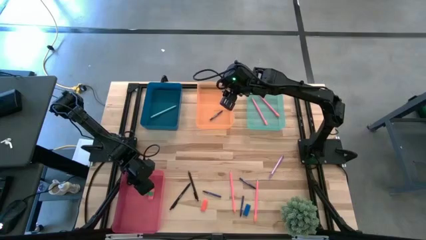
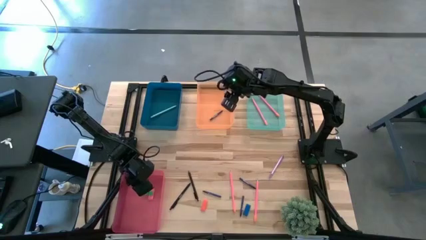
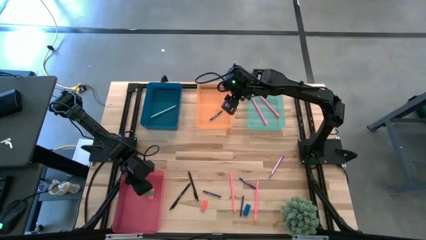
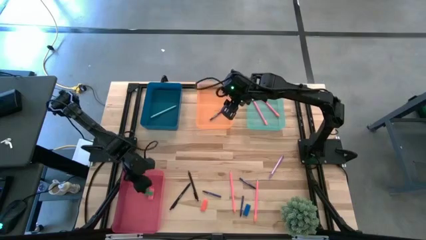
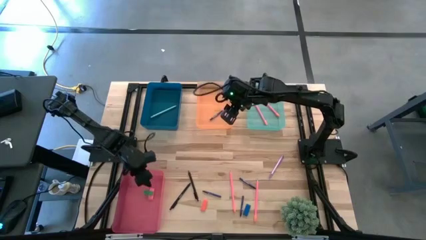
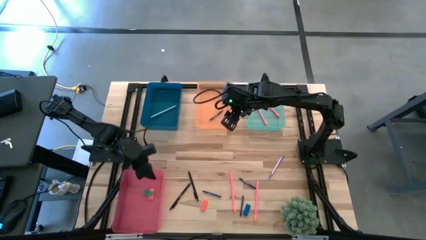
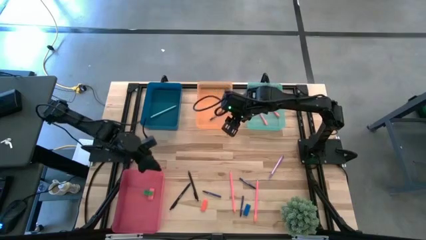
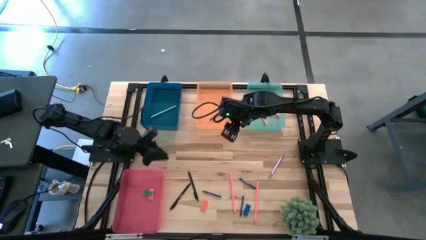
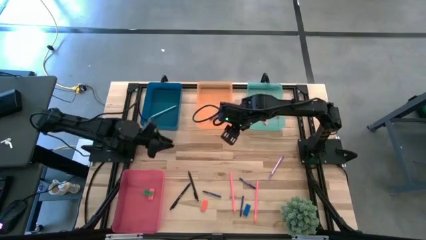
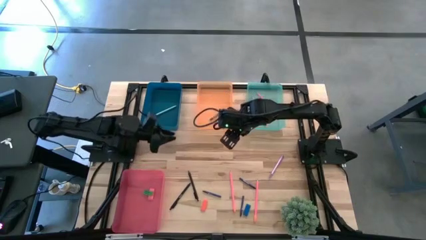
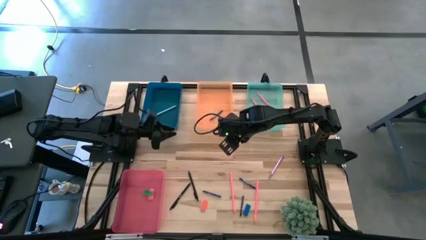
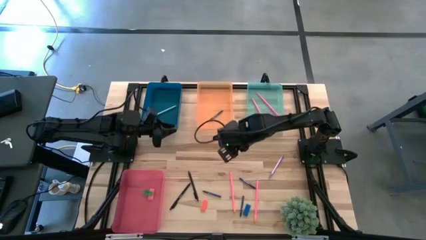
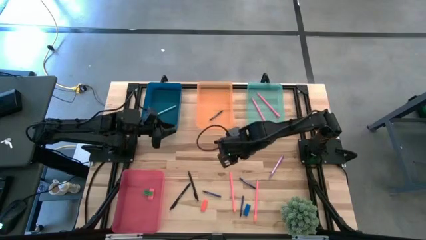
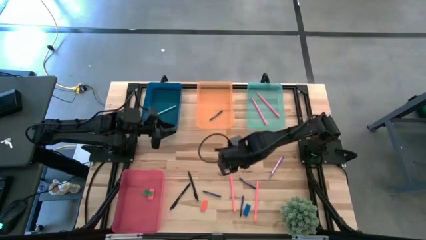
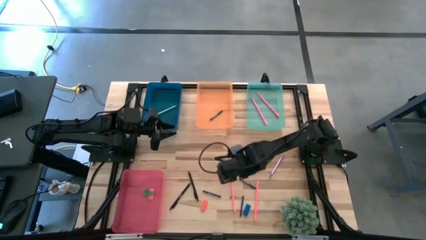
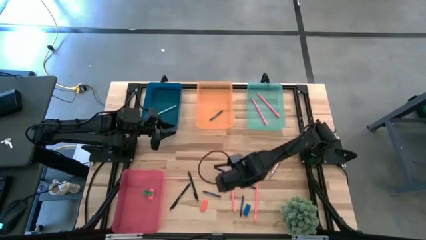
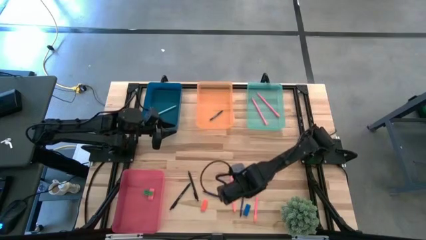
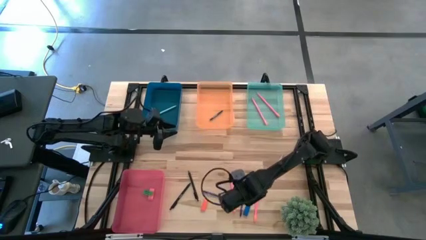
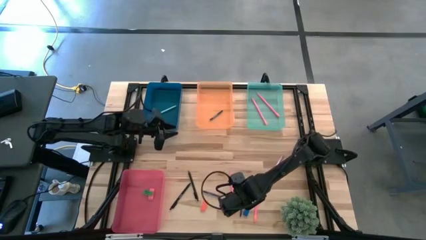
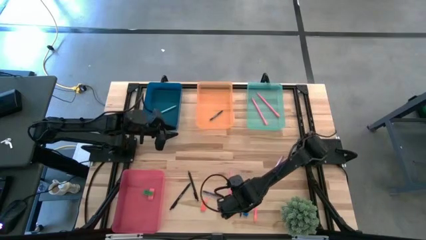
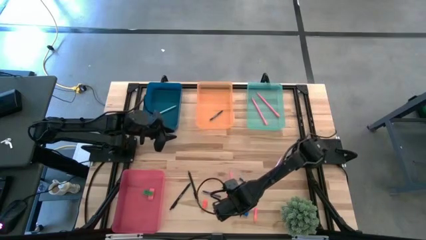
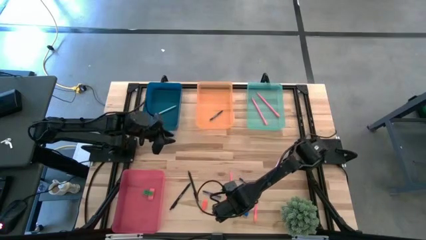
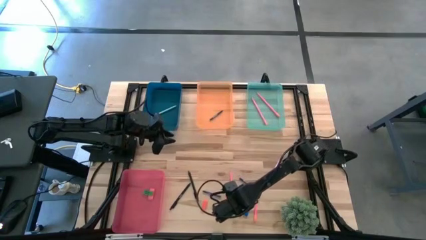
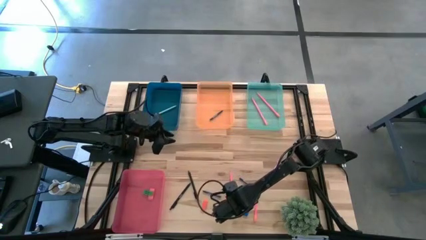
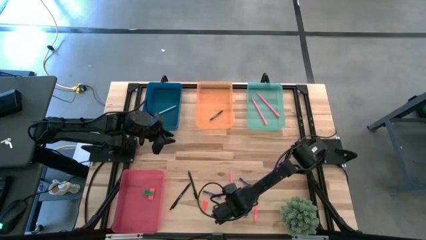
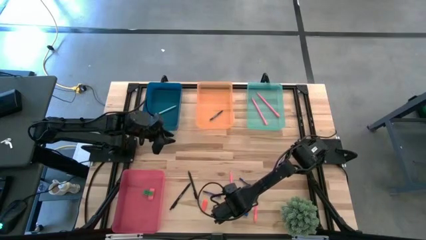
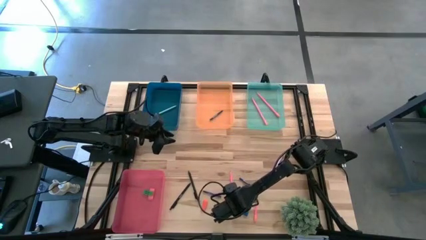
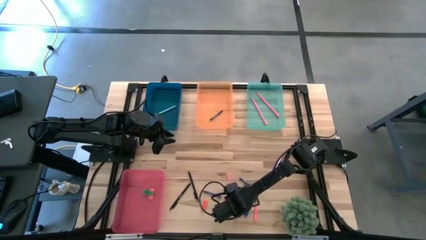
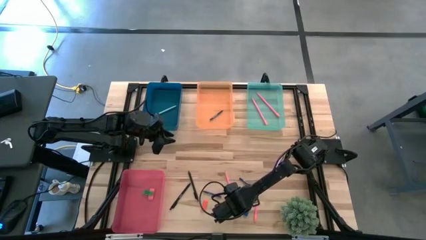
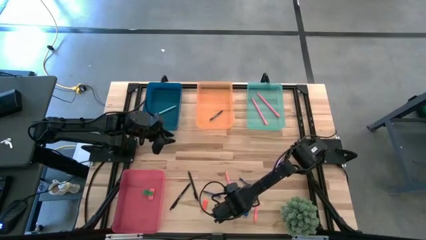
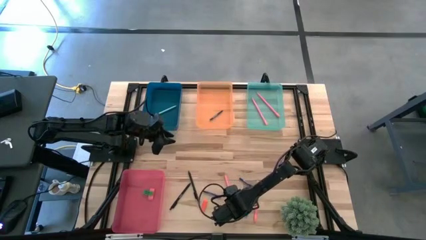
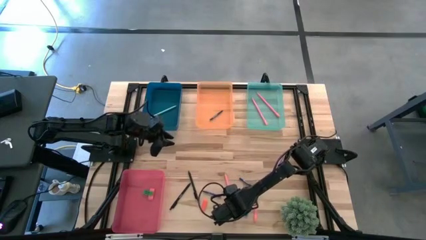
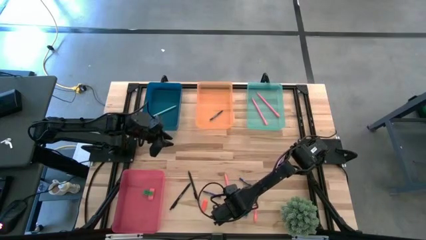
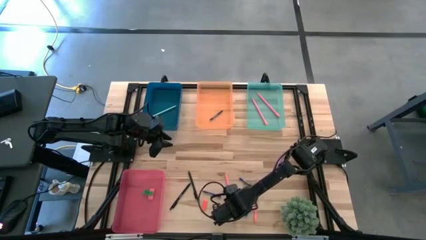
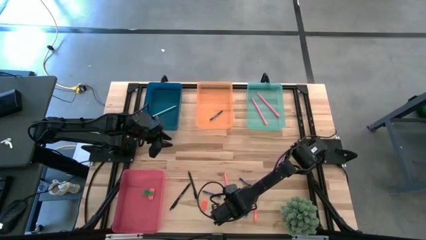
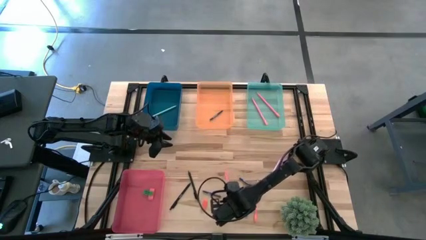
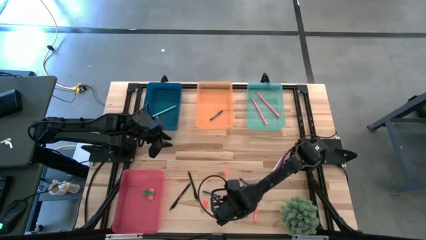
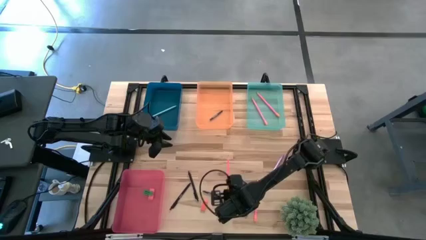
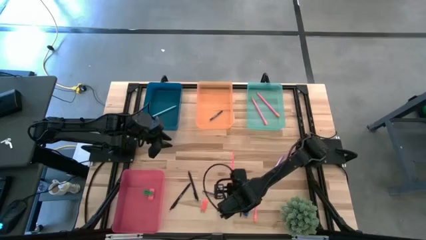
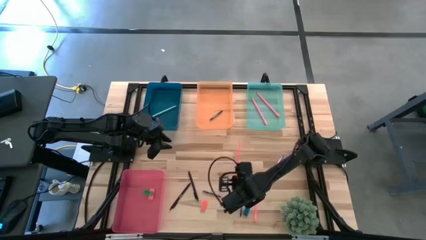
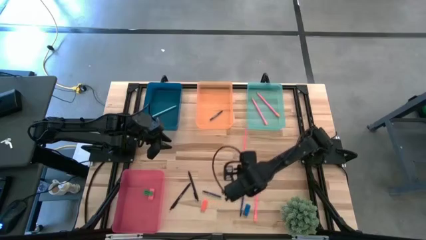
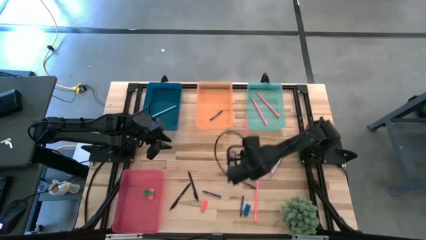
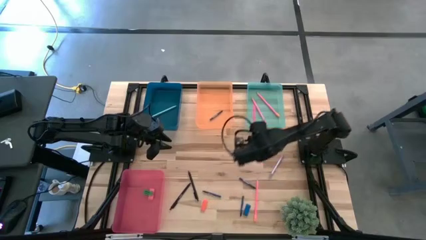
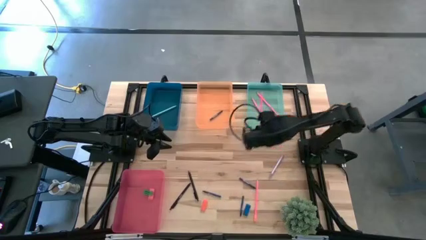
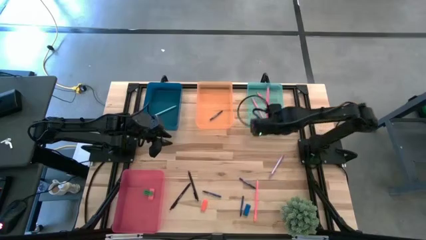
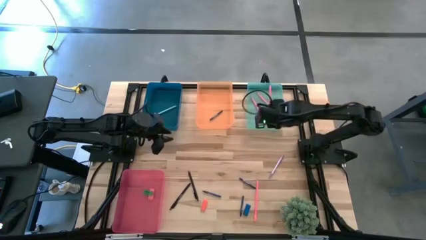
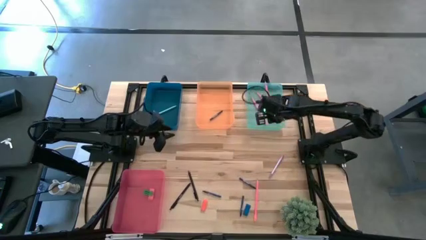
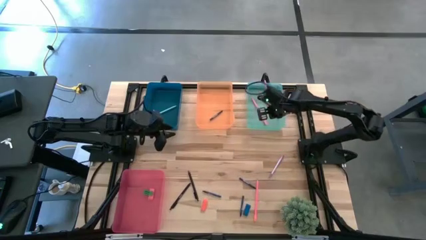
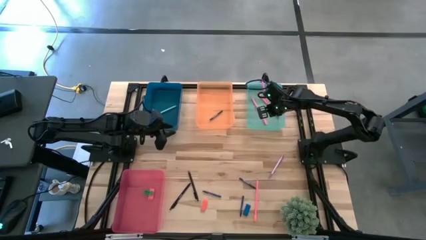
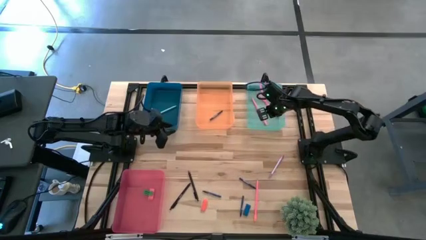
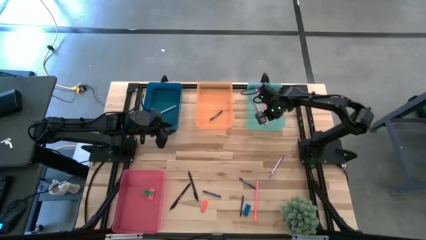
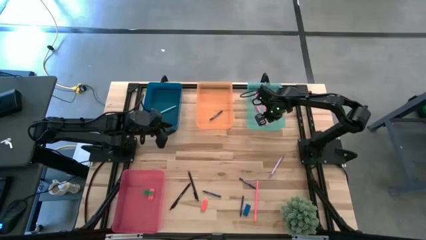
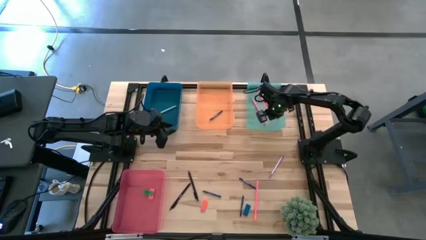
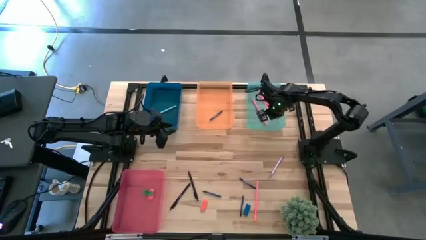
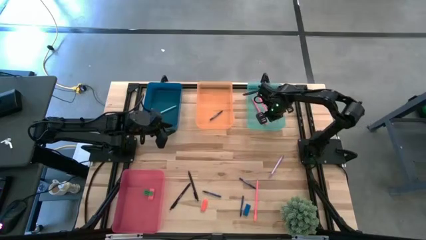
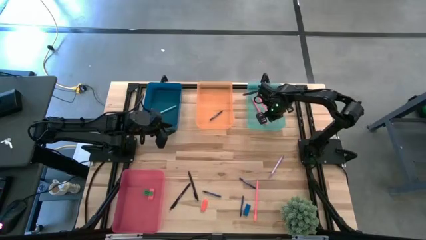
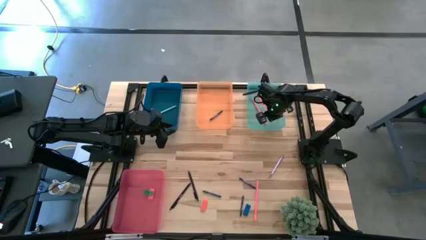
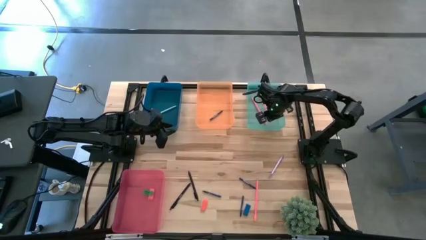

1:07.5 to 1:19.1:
Task: Sort crayons/erasers/pens/pencils in bins
Put the pink pencil into the light blue bin
